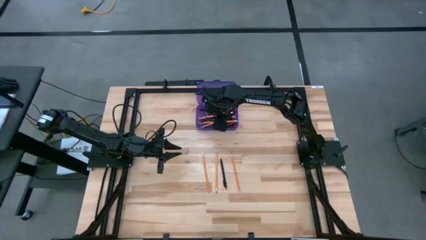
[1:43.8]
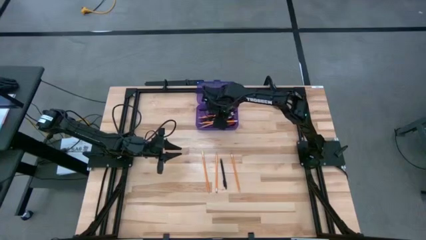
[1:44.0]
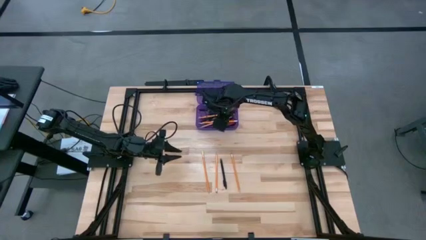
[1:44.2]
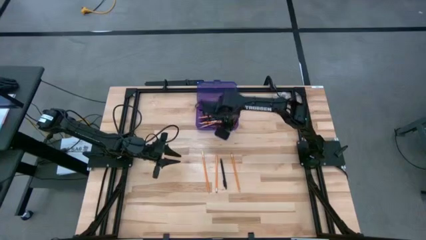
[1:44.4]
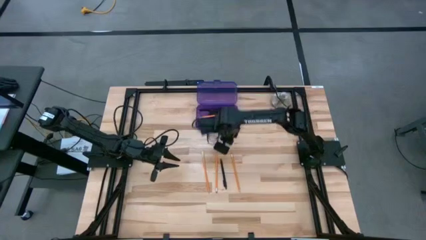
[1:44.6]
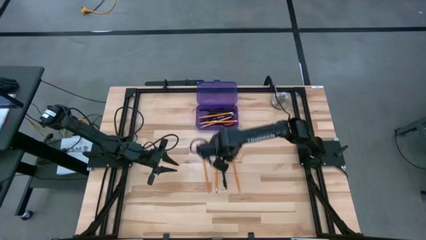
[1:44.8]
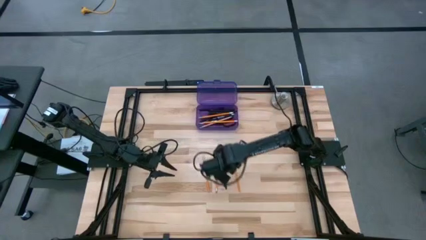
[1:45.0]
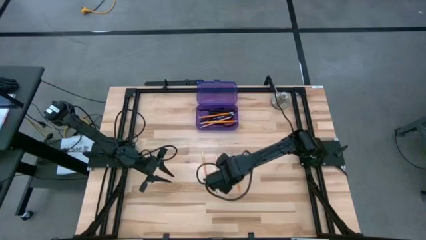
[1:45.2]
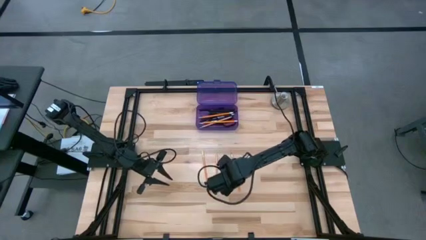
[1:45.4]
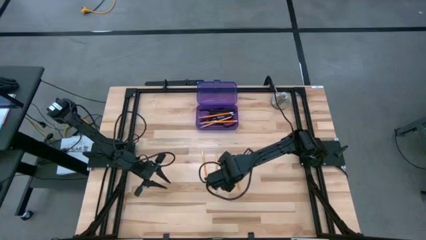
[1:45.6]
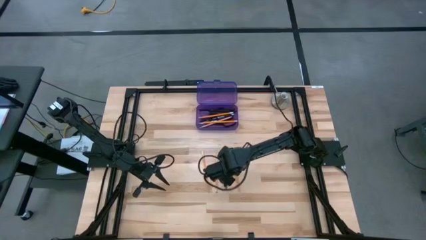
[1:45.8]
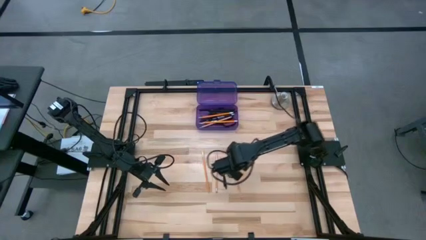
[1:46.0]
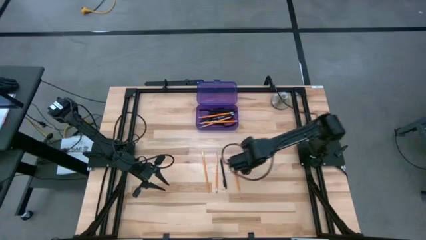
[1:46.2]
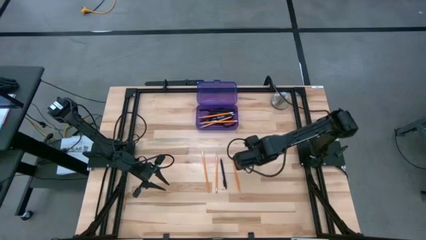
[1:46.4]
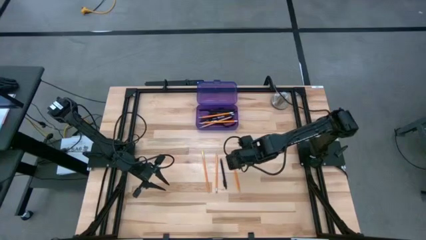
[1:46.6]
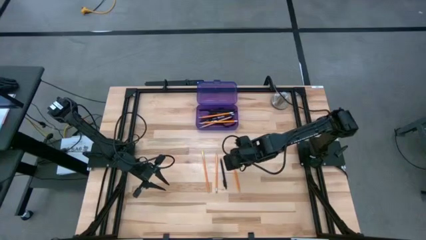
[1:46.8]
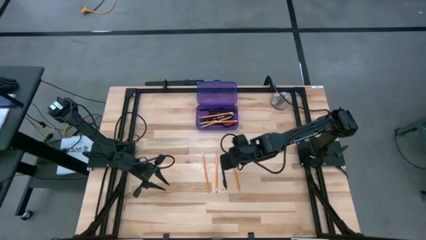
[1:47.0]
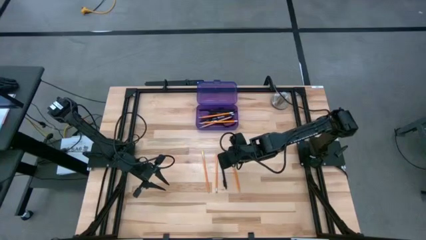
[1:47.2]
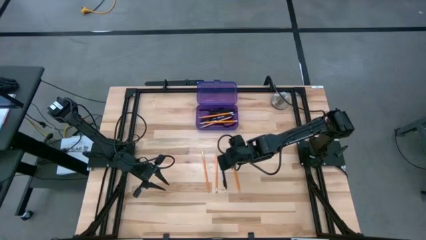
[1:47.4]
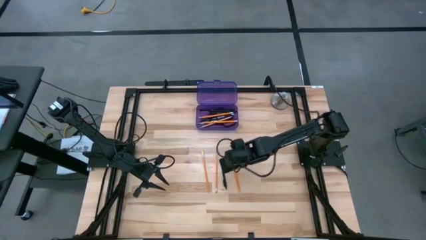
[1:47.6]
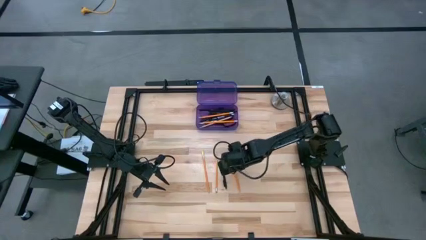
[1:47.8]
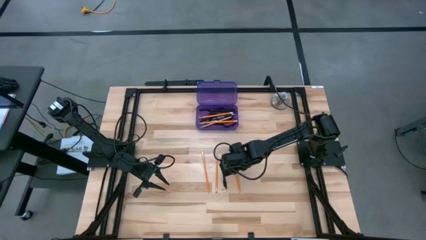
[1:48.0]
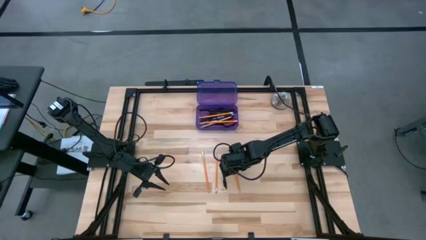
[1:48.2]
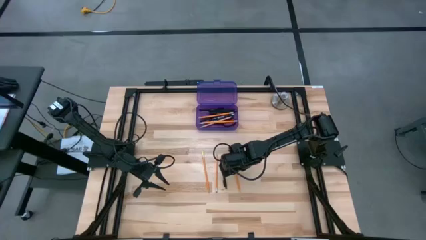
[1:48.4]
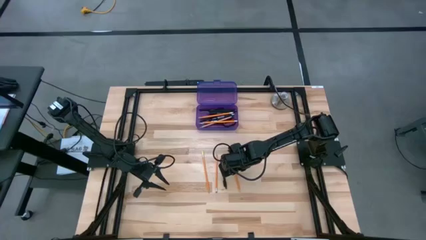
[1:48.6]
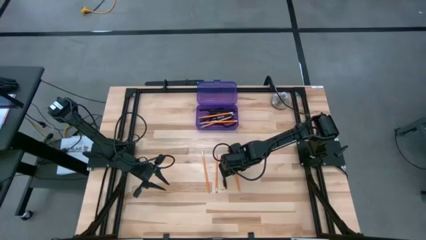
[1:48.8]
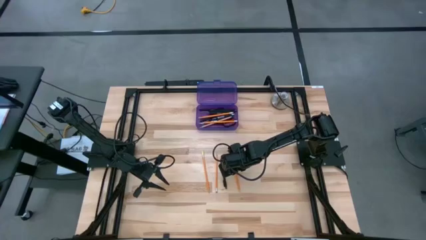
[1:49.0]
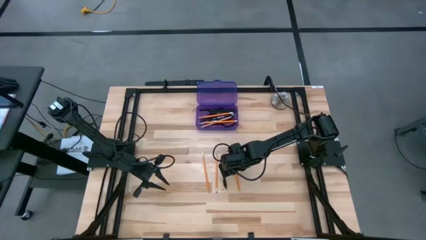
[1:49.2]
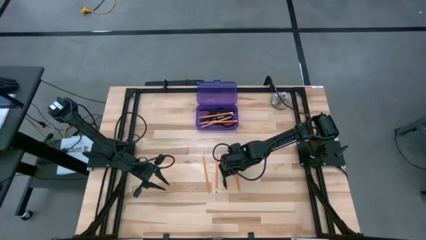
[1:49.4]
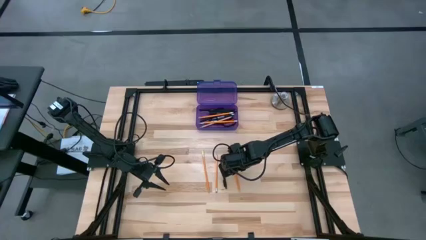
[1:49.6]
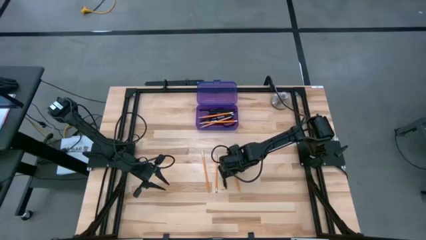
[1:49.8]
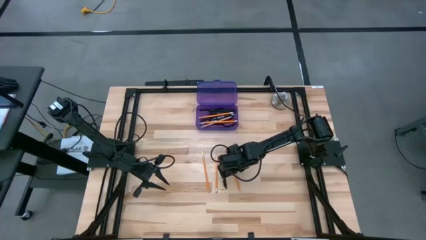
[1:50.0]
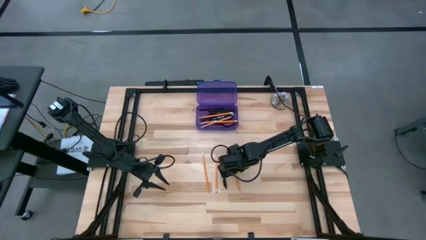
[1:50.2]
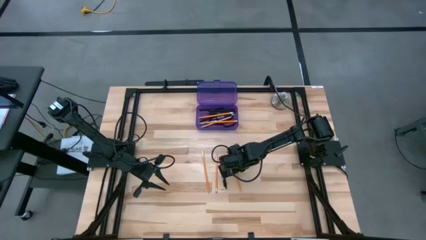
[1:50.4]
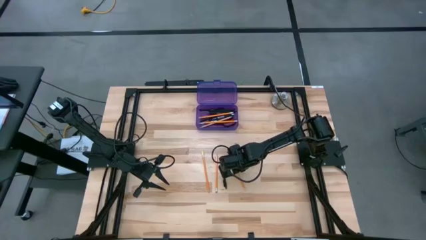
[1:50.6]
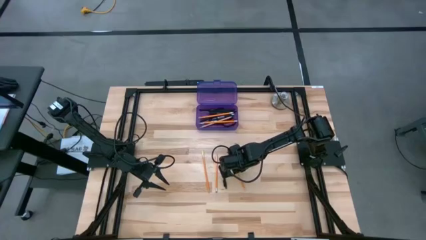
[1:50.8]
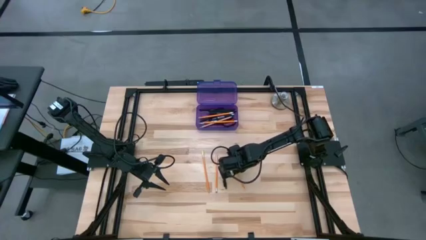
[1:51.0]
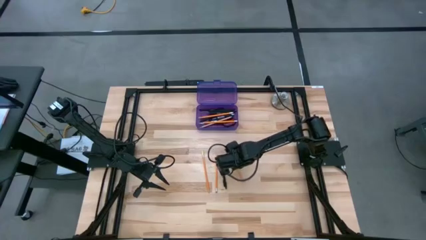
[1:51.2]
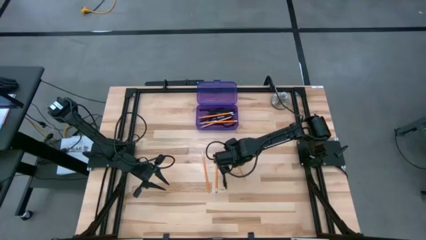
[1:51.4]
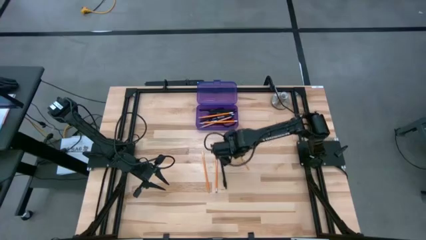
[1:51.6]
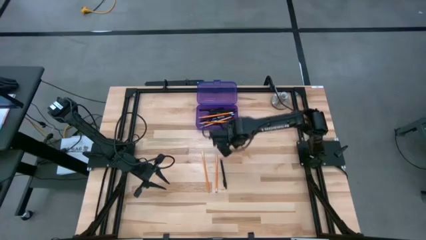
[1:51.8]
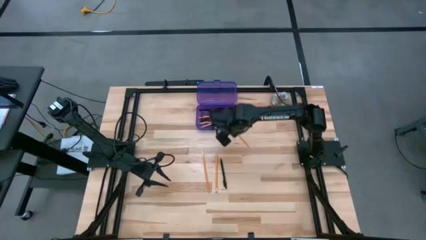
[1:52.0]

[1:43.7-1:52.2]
Task: Pick & place school supplies into a supply box
Put the orange pencil into the violet supply box

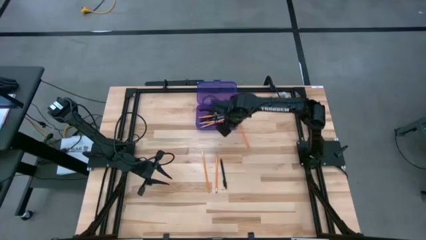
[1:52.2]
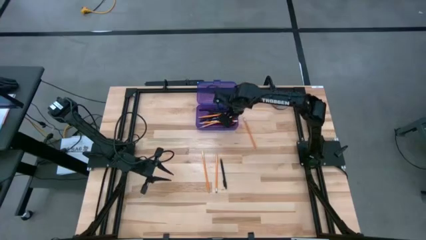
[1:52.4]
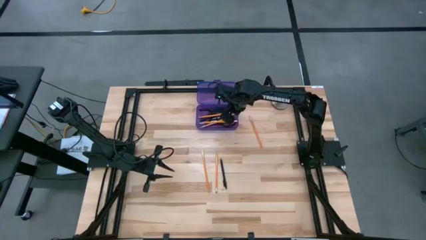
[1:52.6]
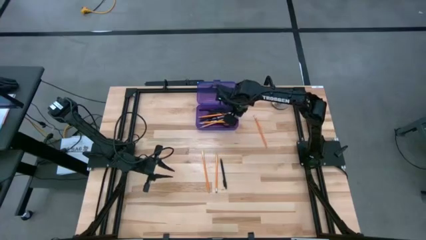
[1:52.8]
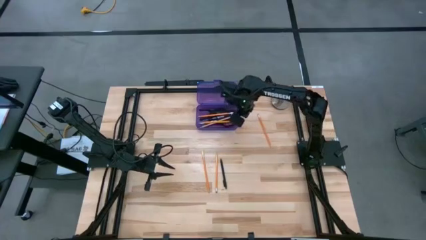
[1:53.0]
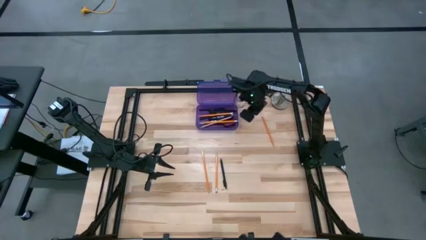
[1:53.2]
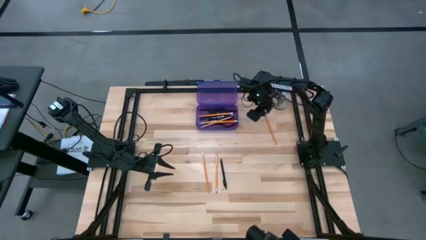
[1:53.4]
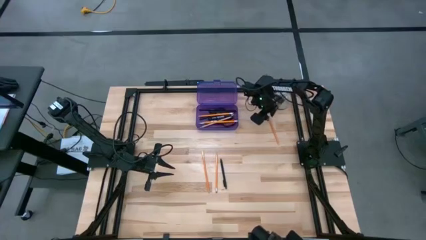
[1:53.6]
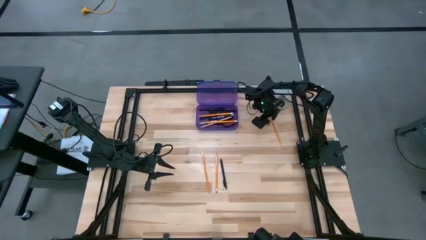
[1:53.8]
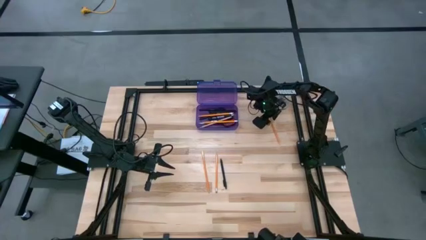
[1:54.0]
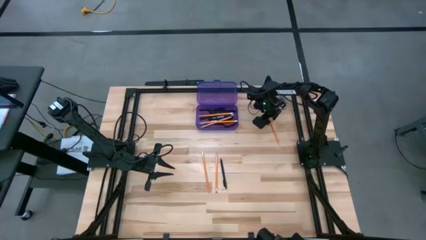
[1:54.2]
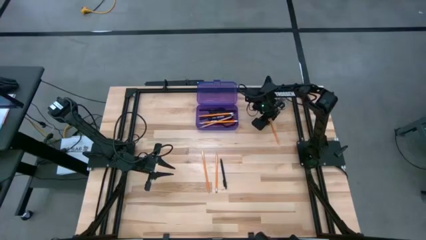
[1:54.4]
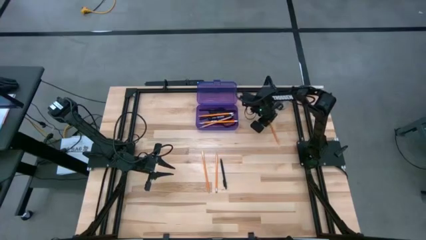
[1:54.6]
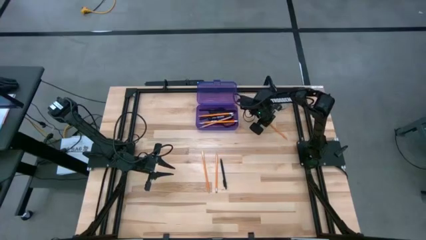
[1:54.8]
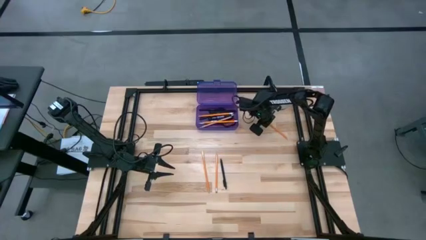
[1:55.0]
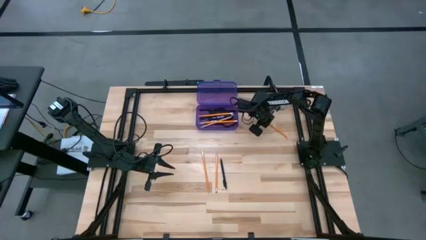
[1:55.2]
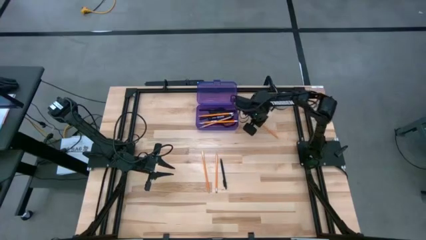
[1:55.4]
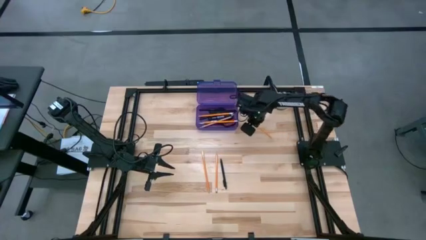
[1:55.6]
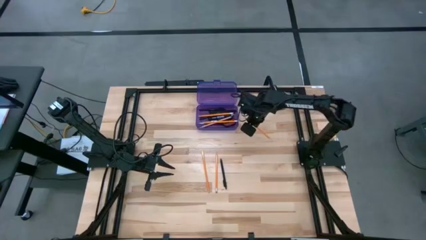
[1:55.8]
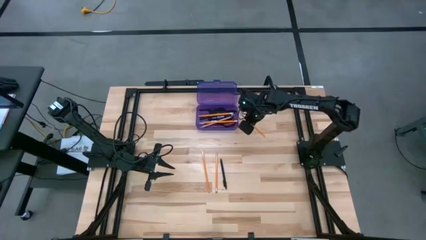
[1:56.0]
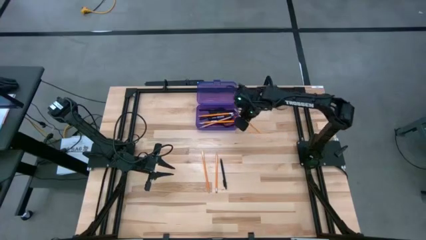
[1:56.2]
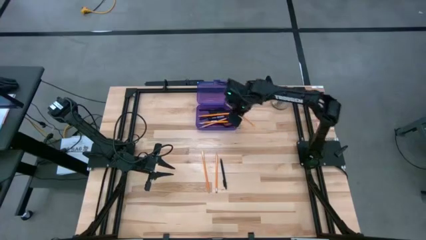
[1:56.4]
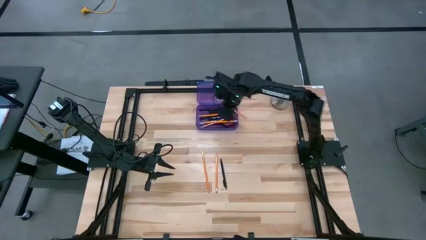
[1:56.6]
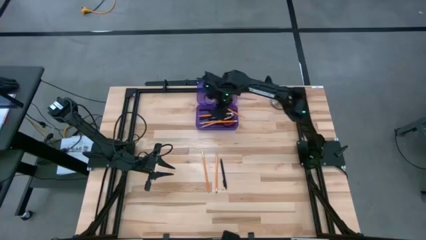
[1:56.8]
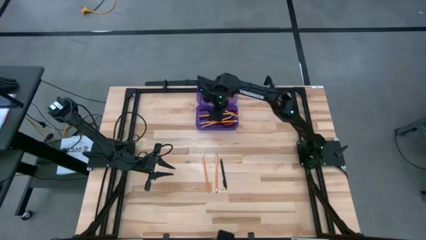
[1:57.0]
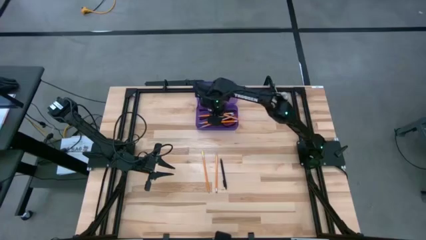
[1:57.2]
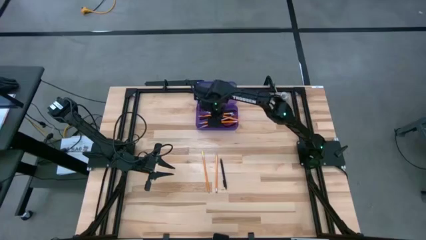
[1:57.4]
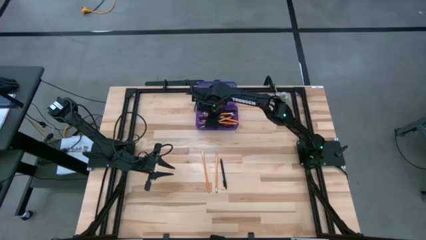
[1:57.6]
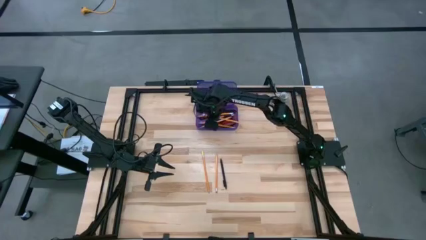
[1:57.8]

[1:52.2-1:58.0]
Put the orange pencil into the violet supply box

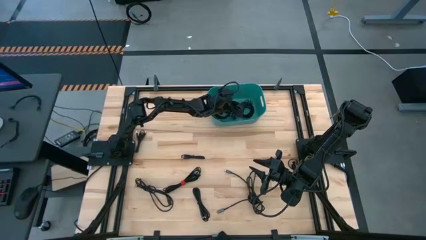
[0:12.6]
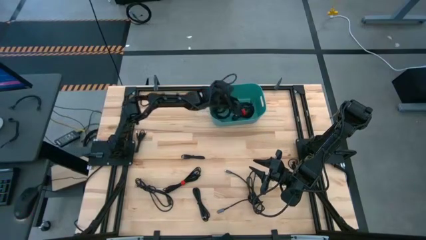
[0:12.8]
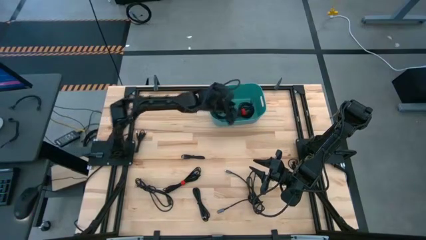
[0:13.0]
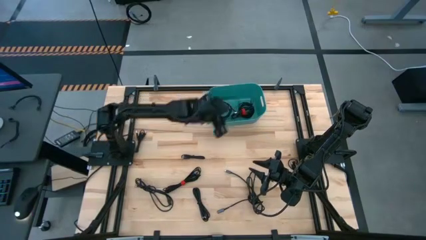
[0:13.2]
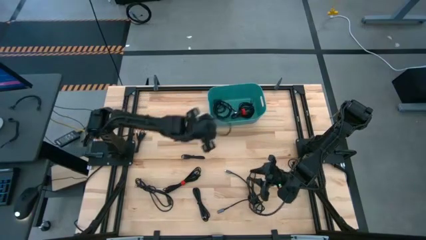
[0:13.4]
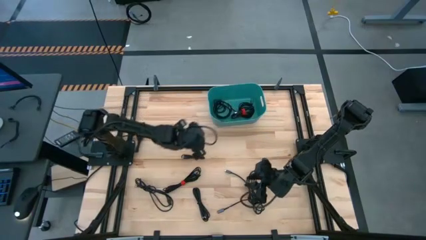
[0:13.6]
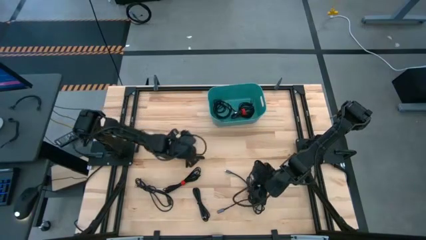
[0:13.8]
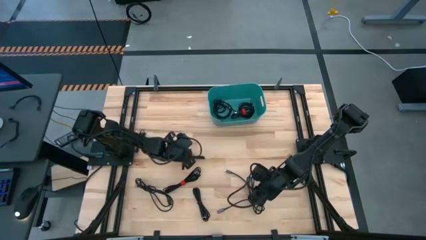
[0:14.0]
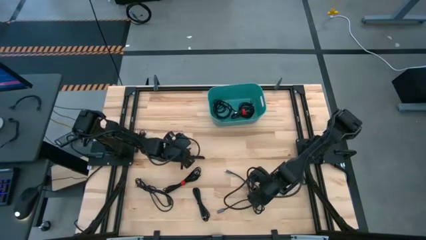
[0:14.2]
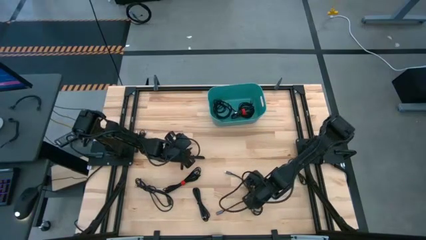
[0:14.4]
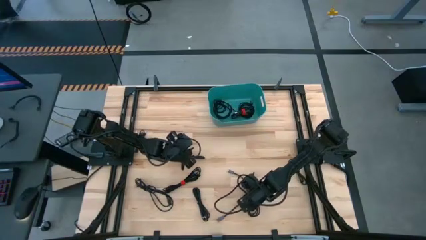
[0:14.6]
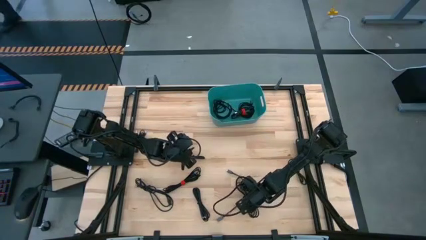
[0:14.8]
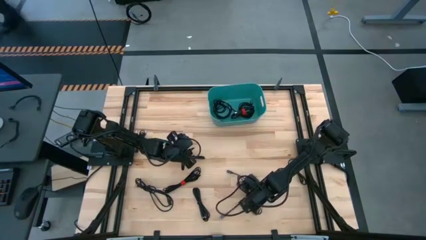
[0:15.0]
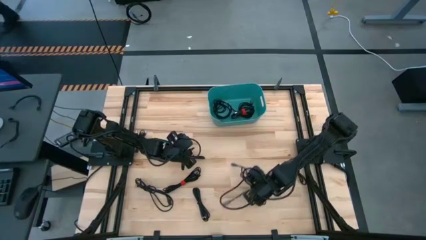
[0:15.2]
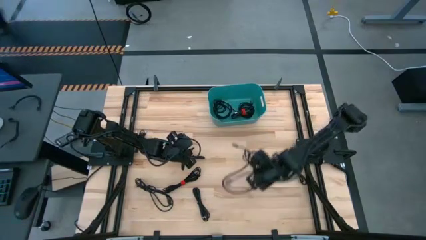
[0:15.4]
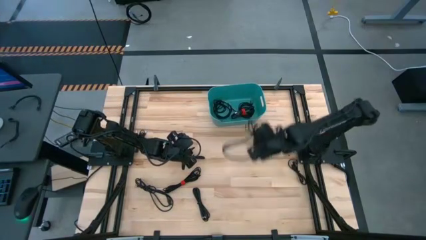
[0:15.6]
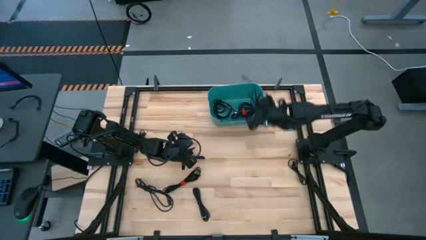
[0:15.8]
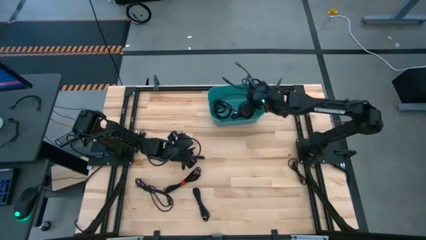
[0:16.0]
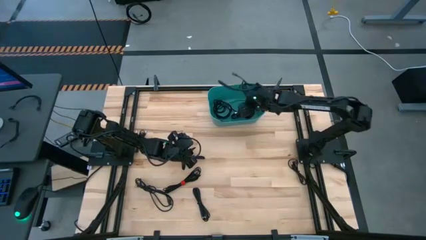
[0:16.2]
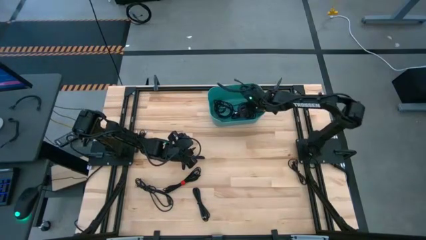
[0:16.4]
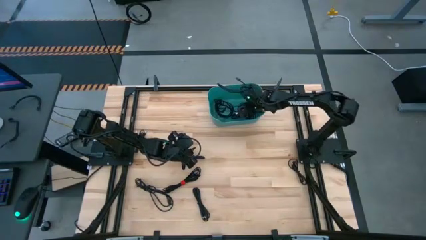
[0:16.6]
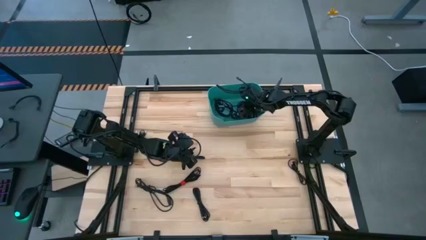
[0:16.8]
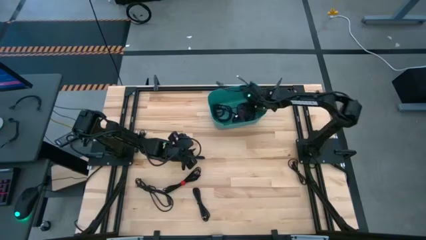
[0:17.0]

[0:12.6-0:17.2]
Task: Pick and place USB-C Cables
Put the black charger cable into the blue bin
